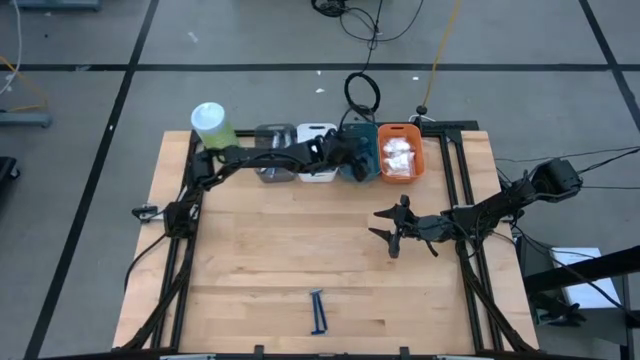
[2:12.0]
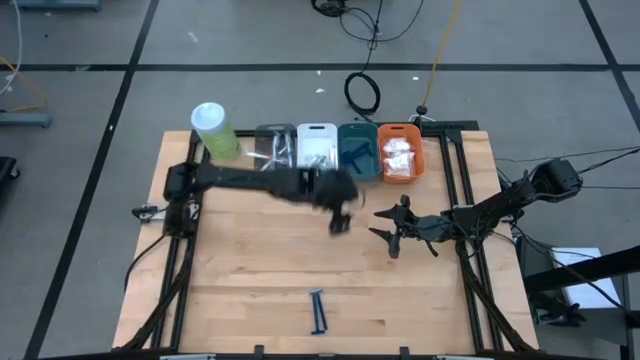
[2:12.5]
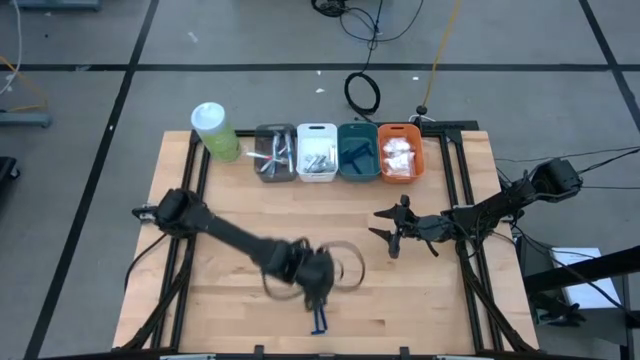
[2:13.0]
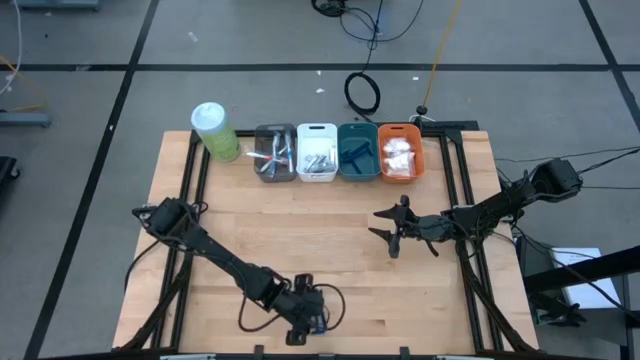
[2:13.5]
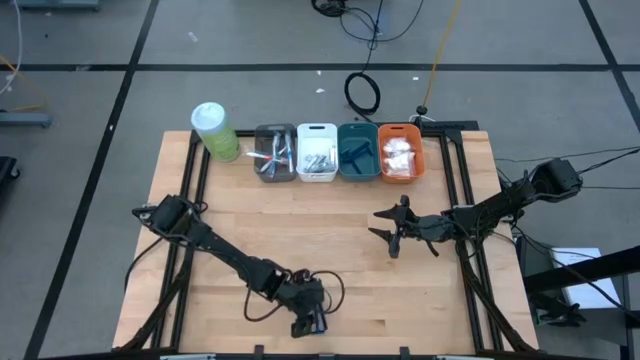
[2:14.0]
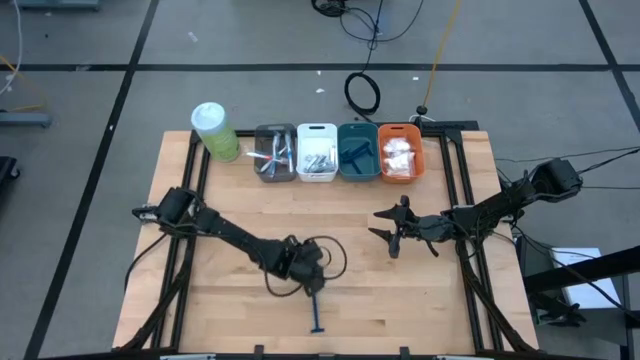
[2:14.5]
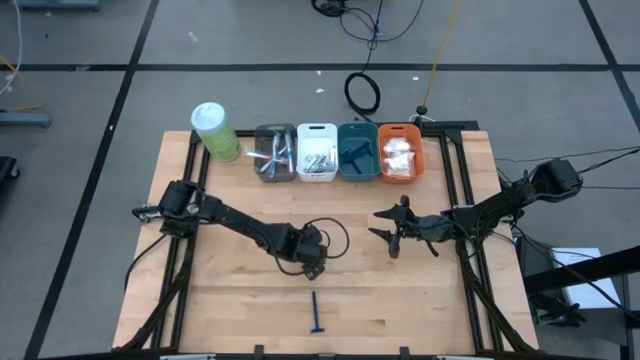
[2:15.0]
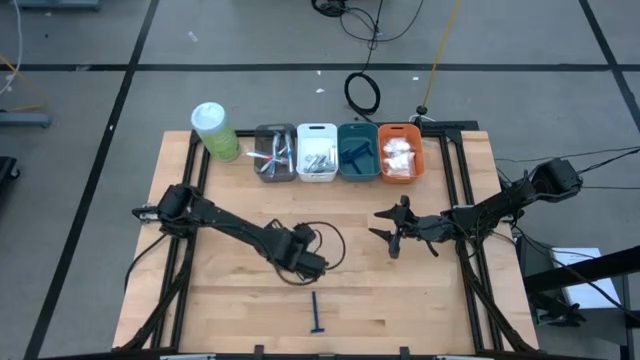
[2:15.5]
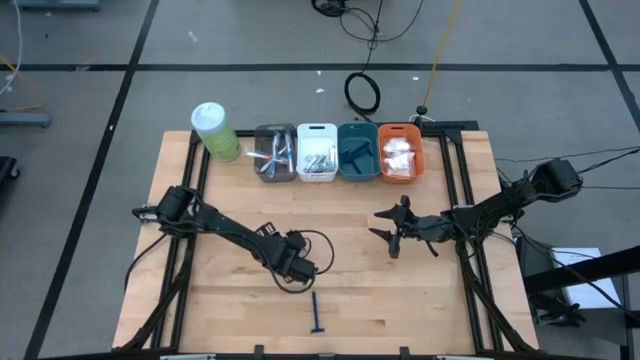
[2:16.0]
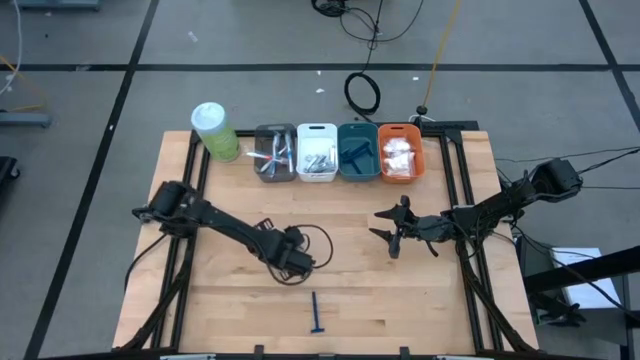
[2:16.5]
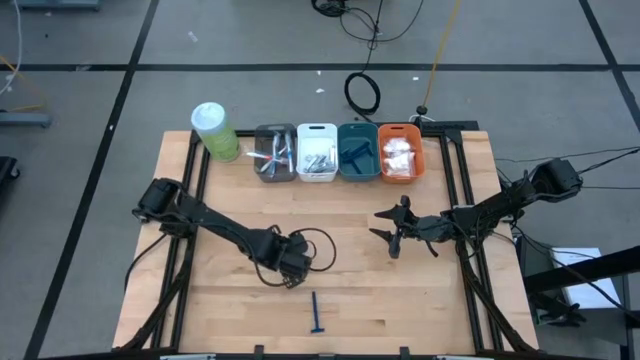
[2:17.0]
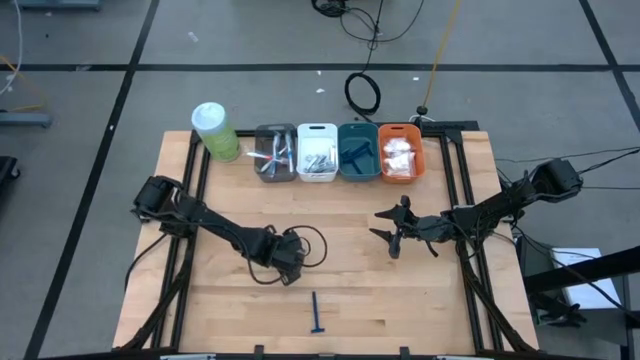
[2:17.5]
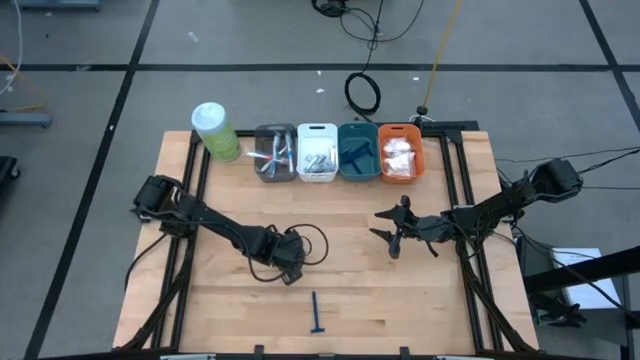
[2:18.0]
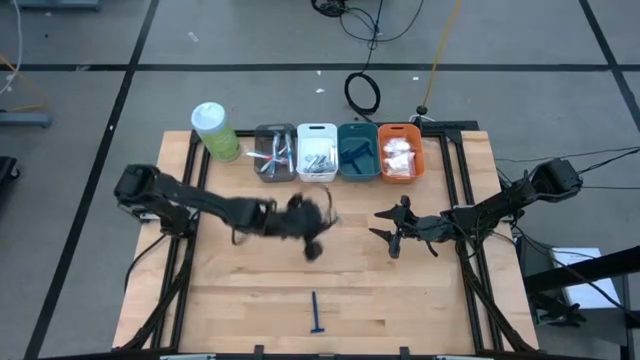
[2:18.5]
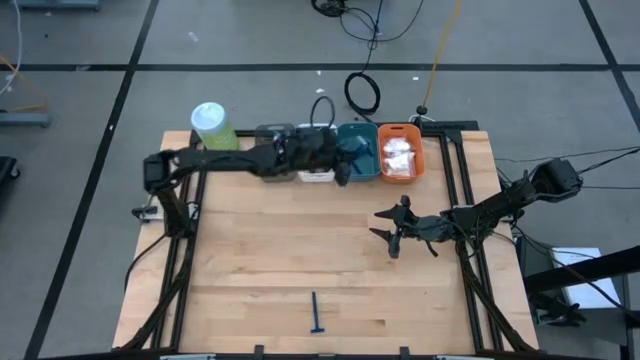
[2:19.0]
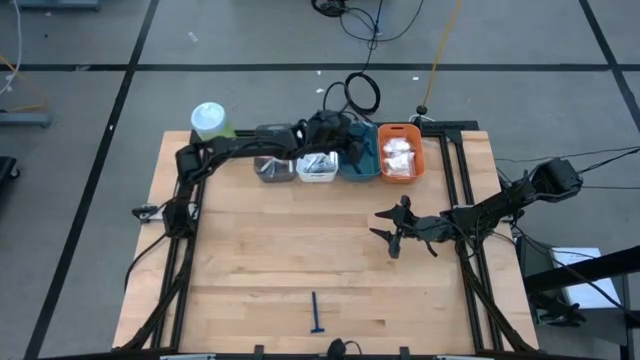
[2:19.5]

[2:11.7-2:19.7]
Task: Pick & Place Travel size toiletries
Put the blue razor into the blue bin

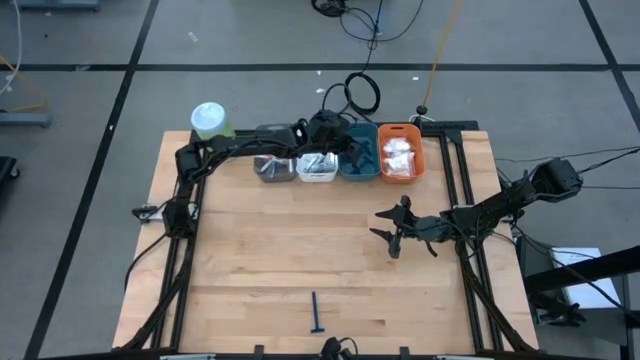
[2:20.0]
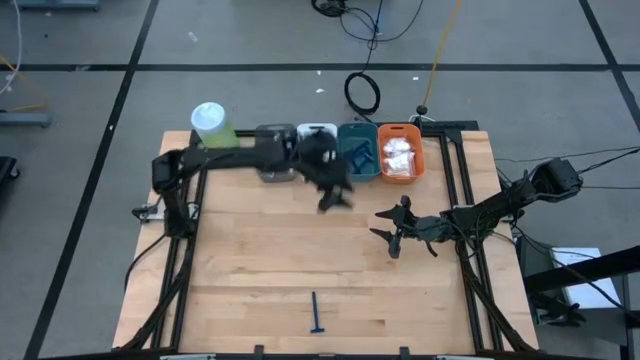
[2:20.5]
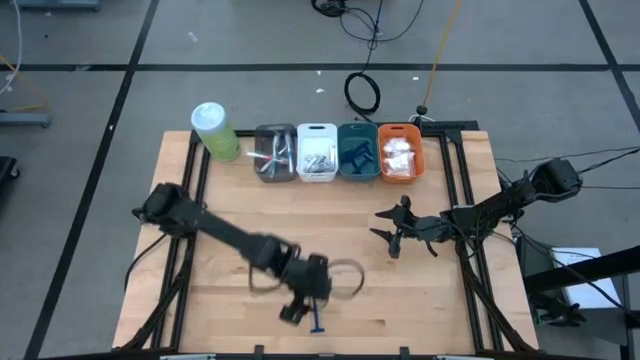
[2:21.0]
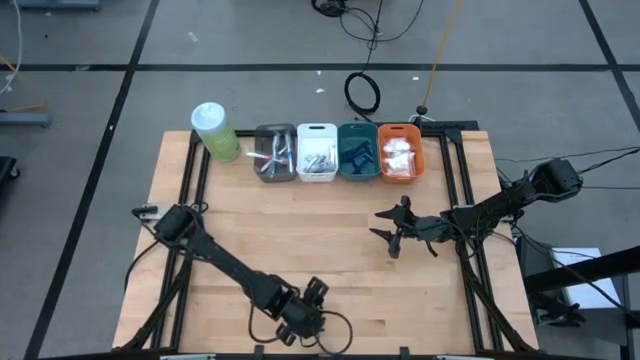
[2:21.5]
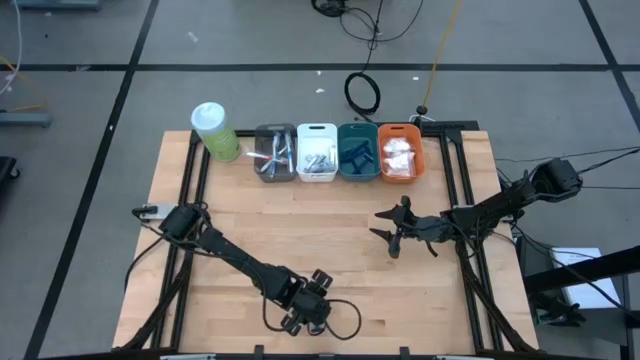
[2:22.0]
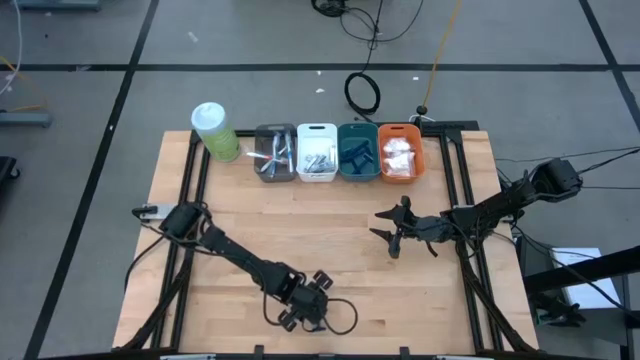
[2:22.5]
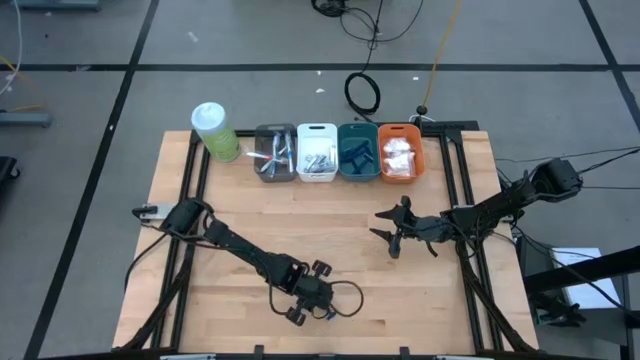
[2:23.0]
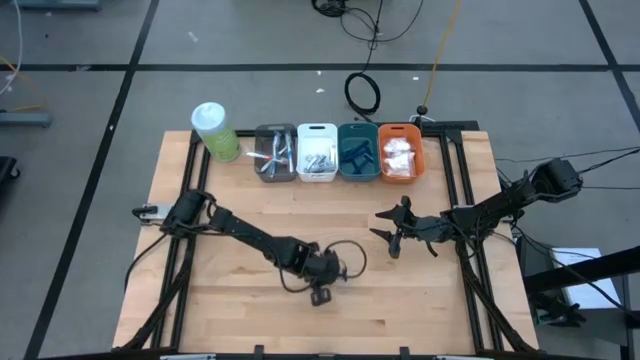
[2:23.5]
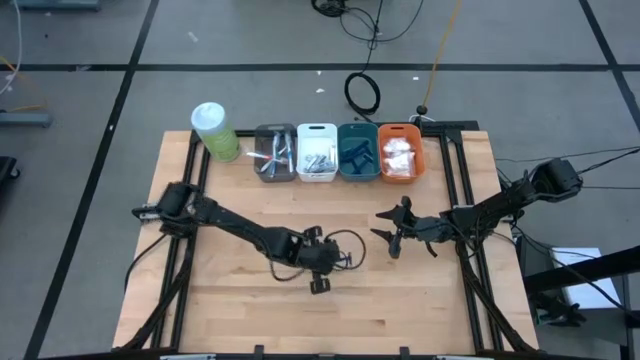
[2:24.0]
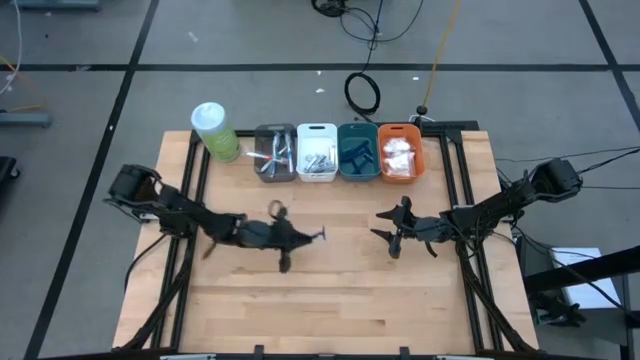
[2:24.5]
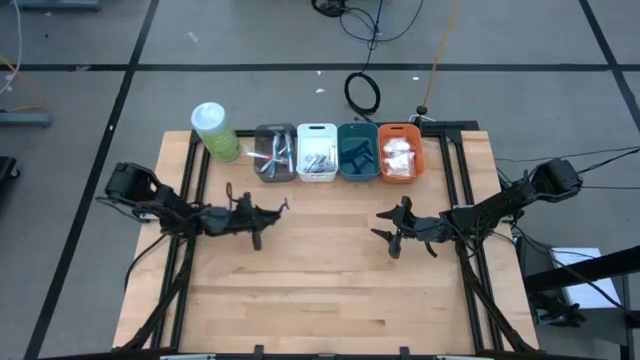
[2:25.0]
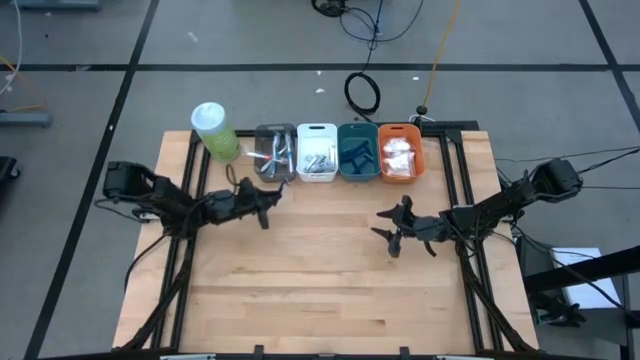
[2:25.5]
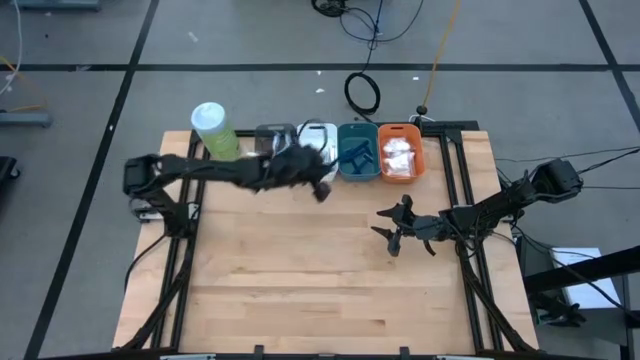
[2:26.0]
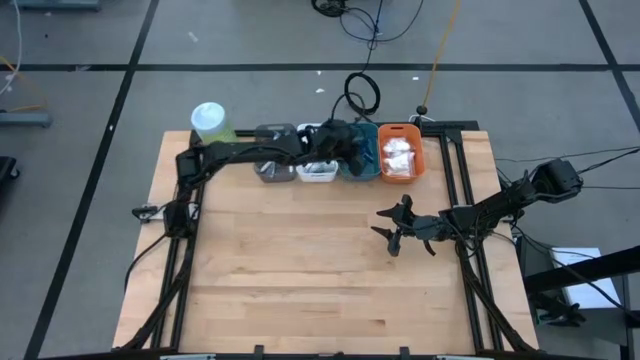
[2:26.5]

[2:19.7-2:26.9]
Put the blue razor into the blue bin

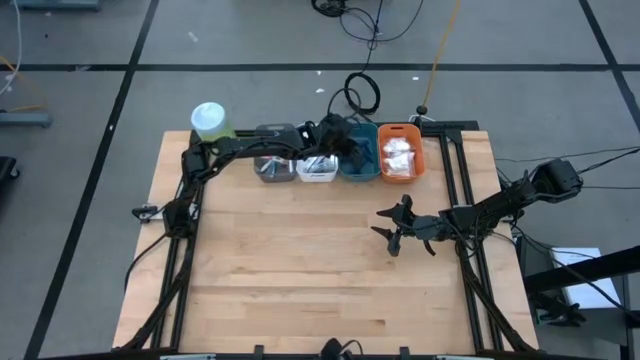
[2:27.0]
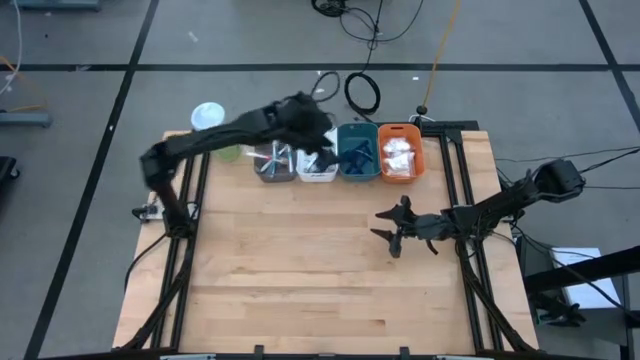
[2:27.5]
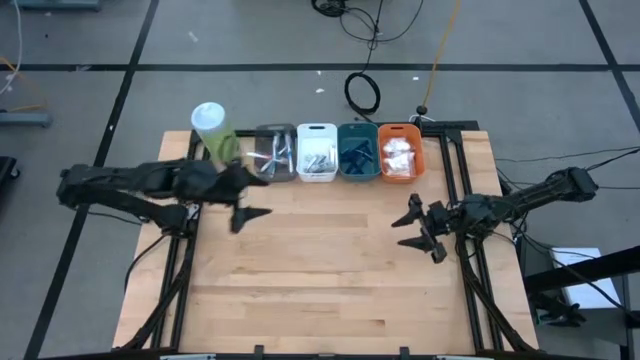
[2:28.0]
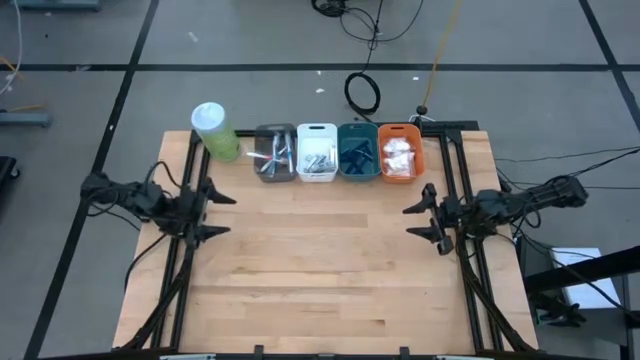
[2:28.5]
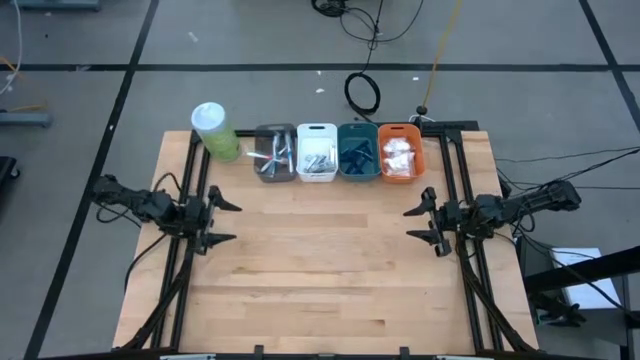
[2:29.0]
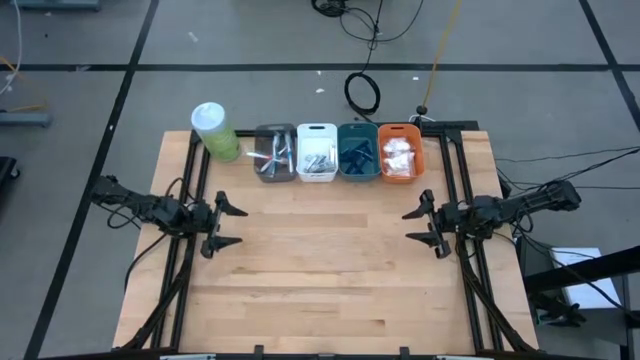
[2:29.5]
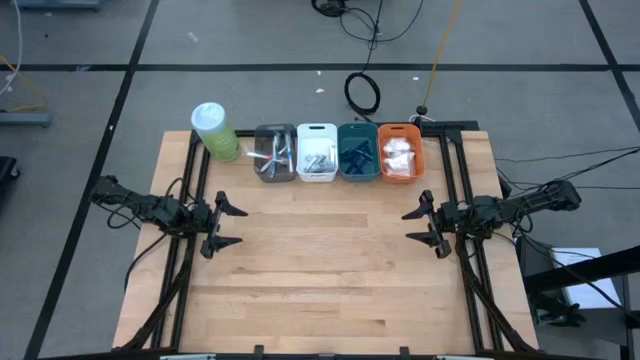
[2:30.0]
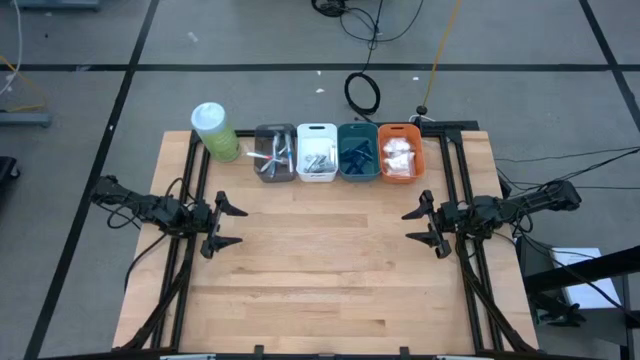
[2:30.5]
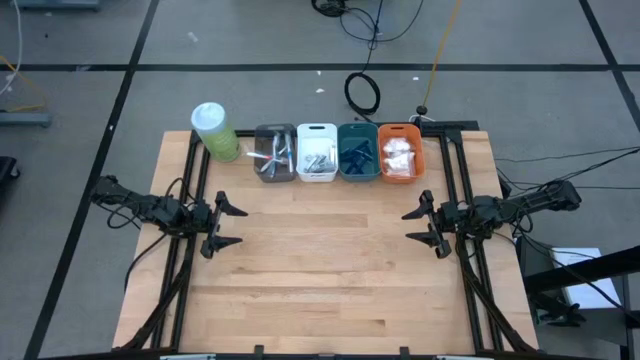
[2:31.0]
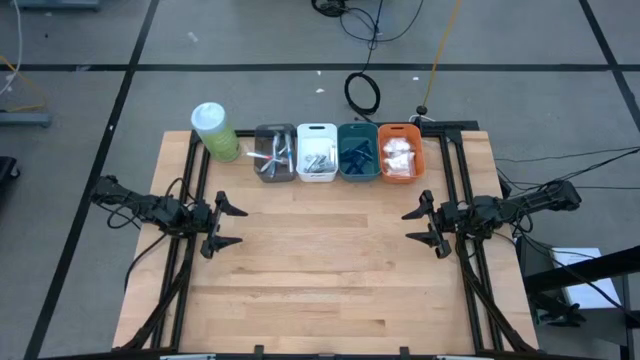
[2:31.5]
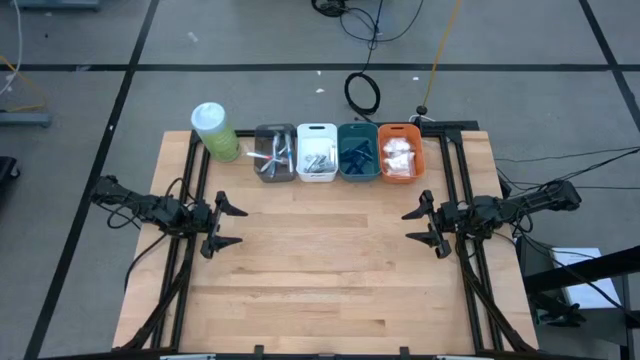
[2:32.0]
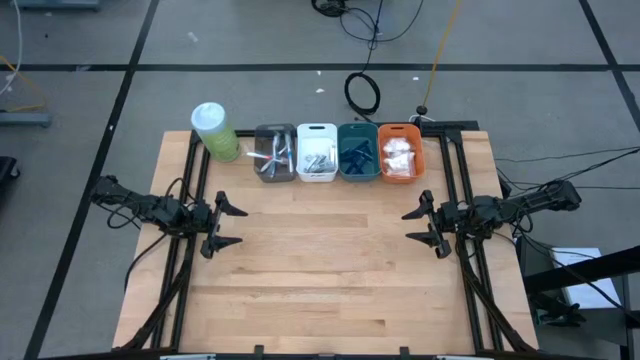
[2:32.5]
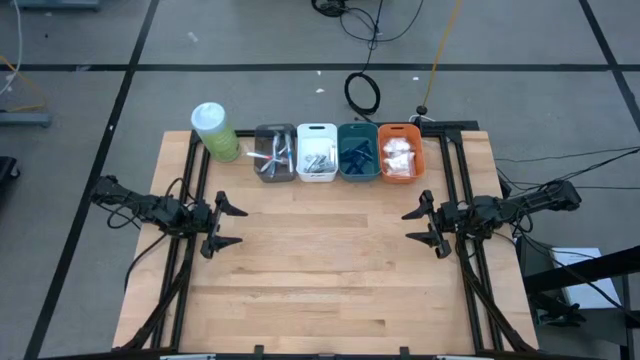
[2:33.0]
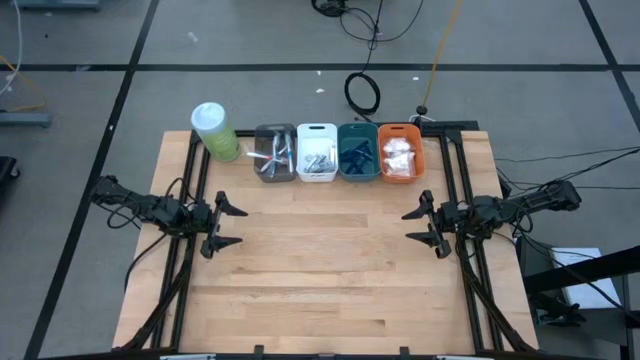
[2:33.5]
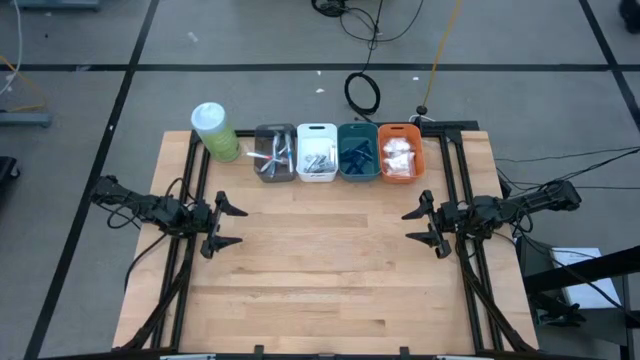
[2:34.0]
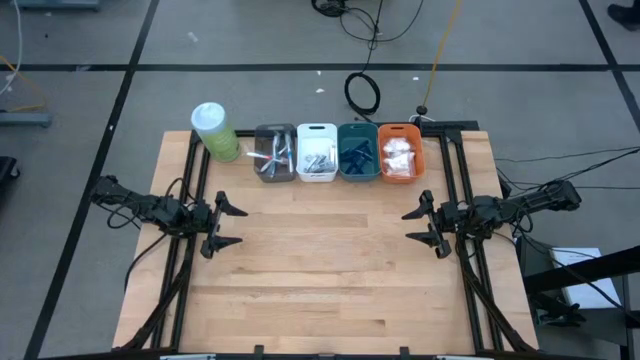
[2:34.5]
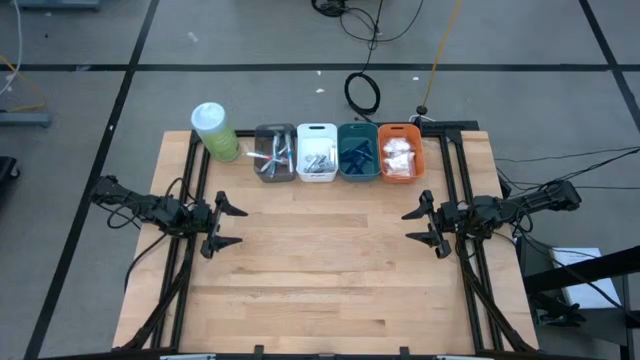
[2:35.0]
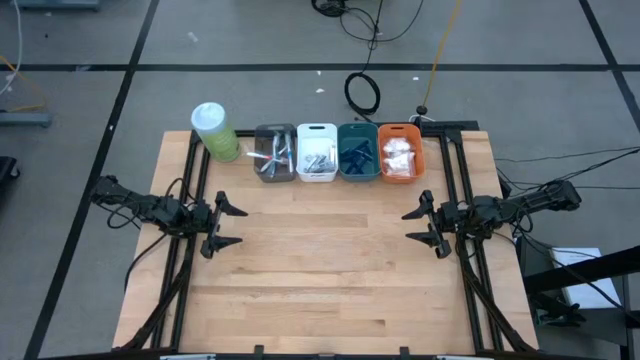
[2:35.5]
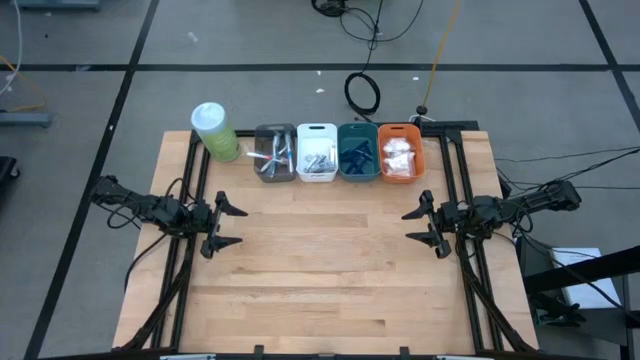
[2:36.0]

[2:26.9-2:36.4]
Return to Home Position
